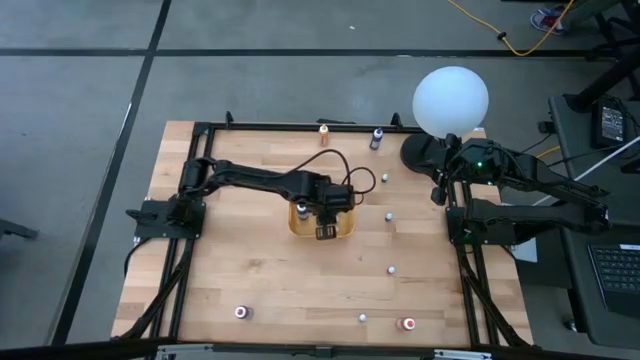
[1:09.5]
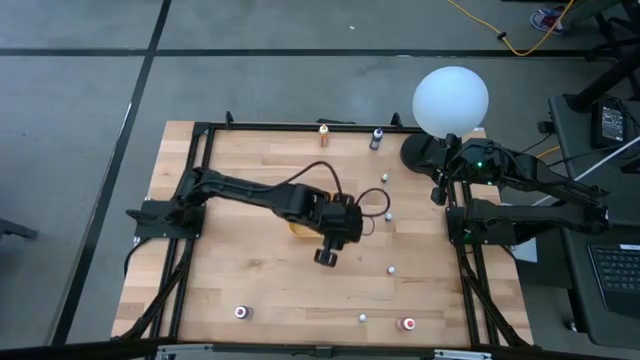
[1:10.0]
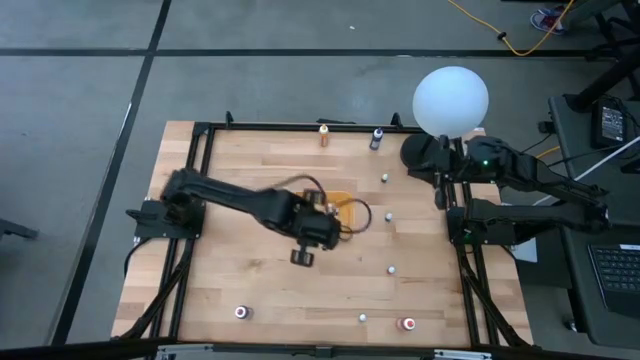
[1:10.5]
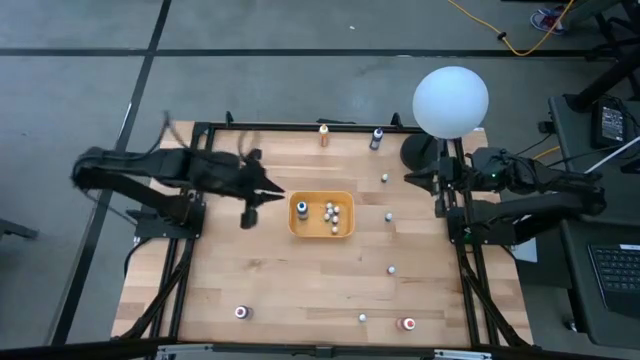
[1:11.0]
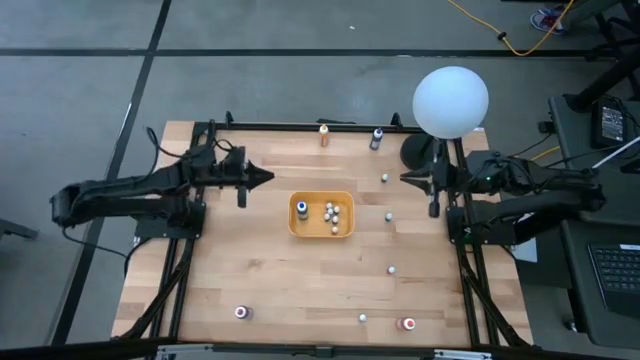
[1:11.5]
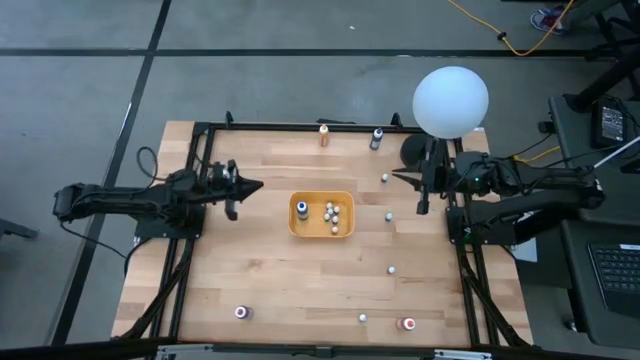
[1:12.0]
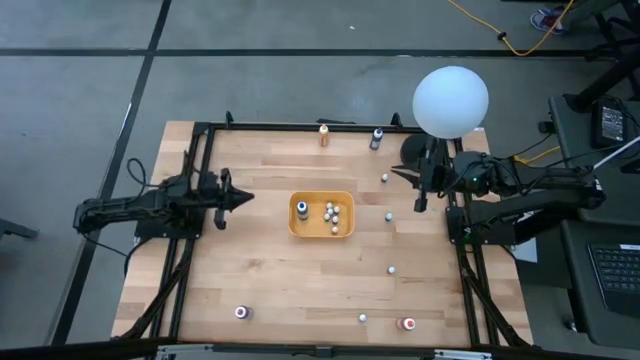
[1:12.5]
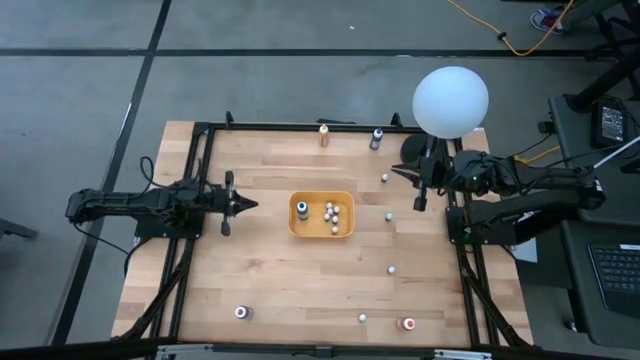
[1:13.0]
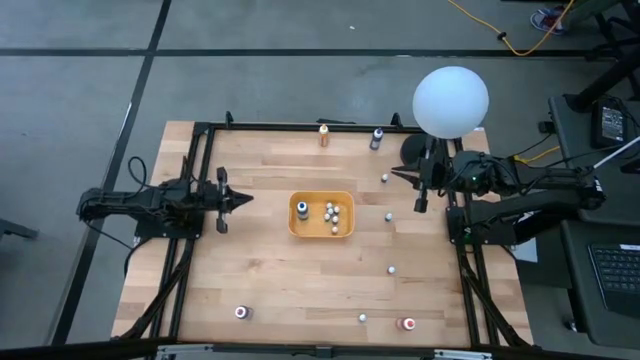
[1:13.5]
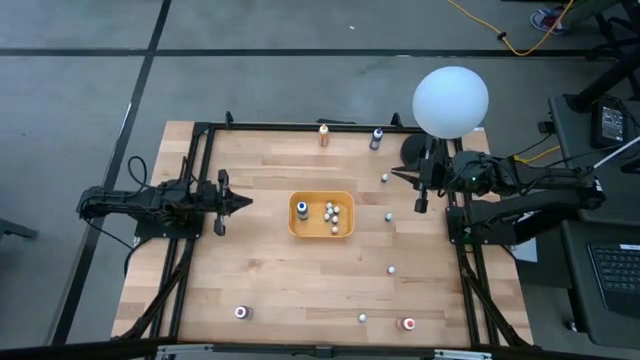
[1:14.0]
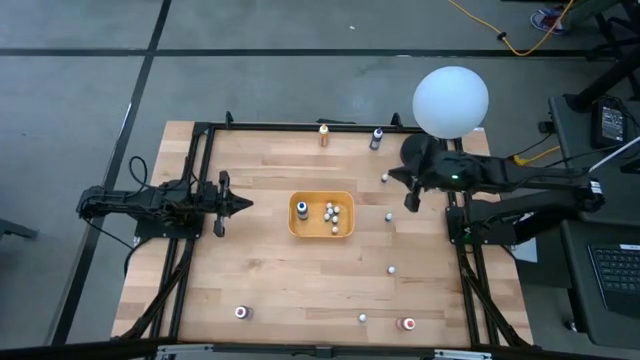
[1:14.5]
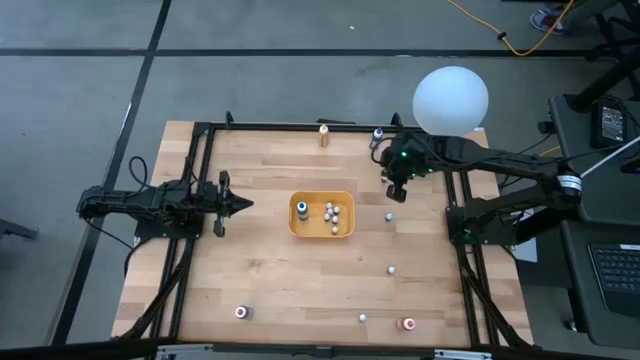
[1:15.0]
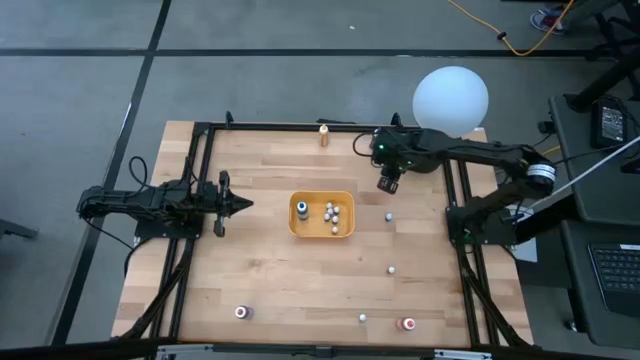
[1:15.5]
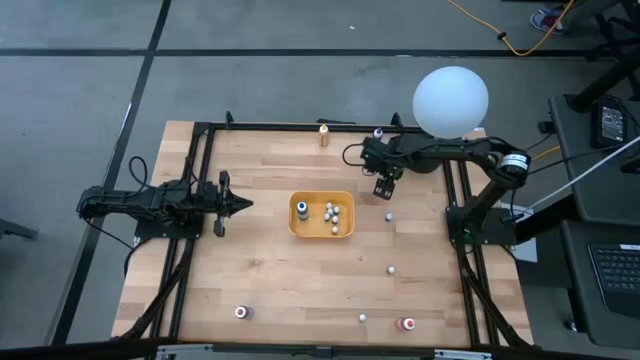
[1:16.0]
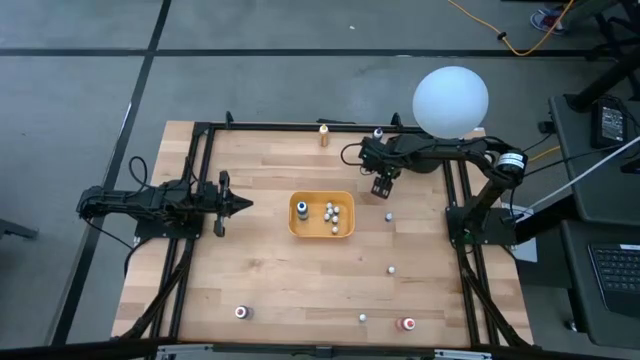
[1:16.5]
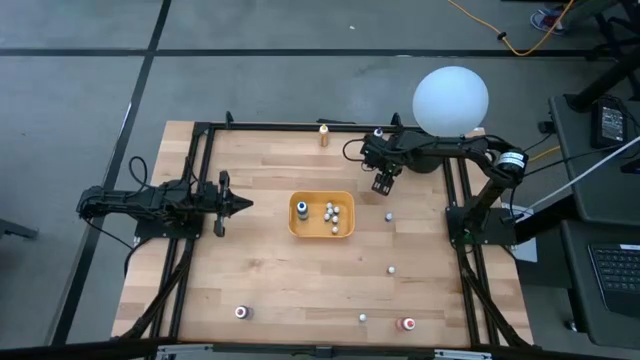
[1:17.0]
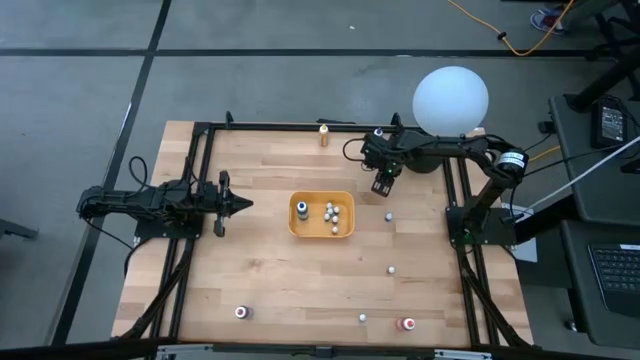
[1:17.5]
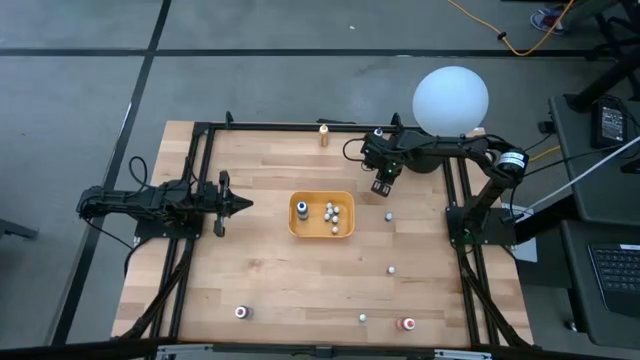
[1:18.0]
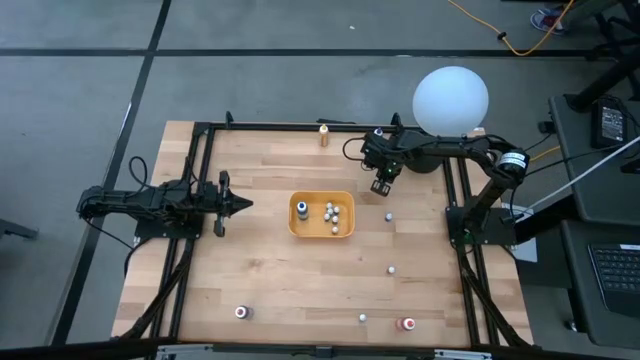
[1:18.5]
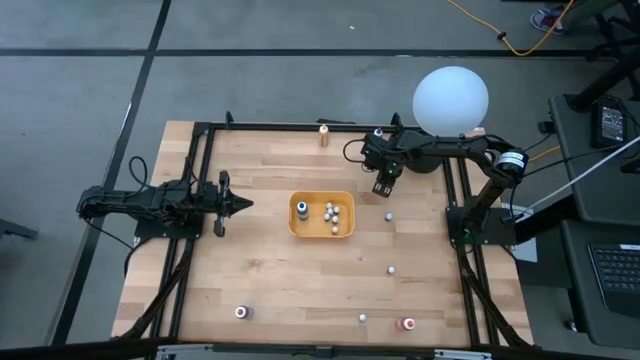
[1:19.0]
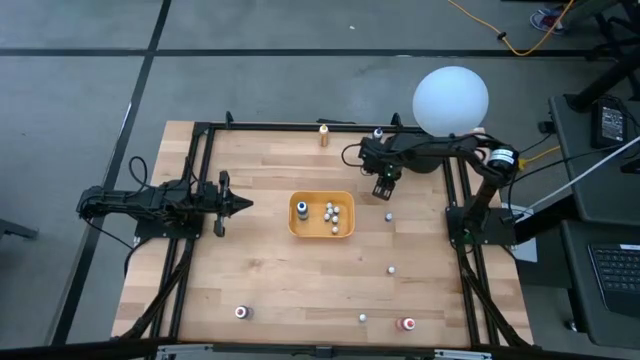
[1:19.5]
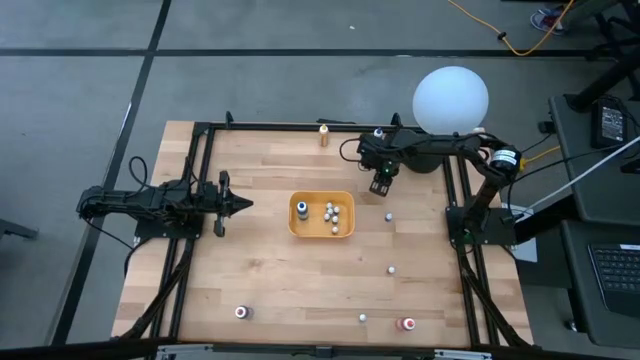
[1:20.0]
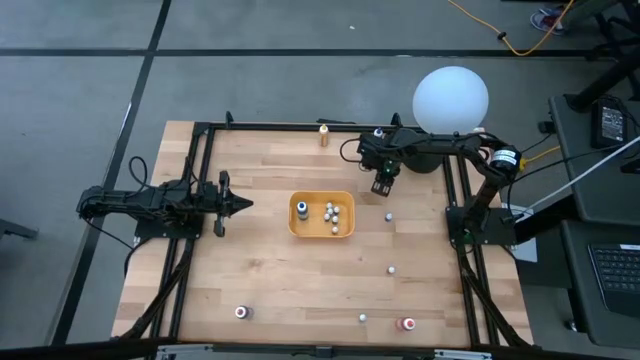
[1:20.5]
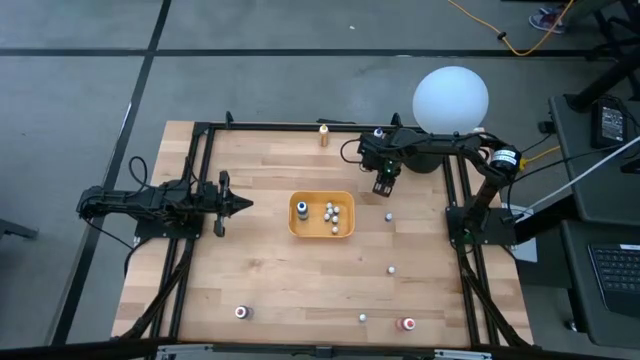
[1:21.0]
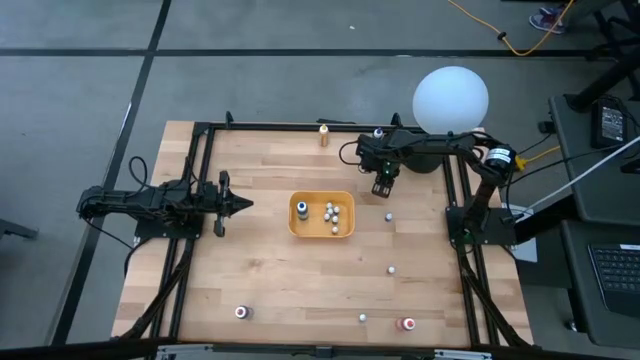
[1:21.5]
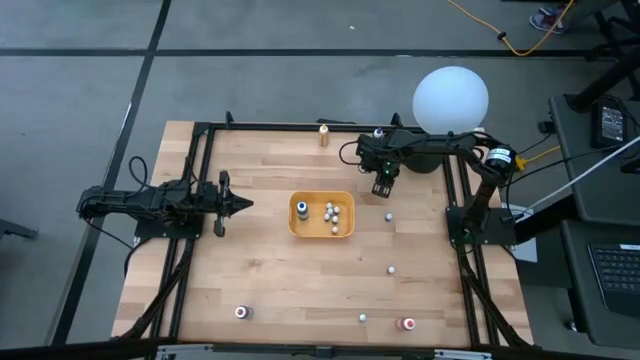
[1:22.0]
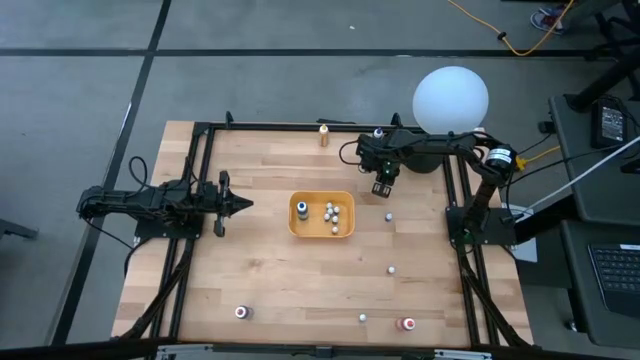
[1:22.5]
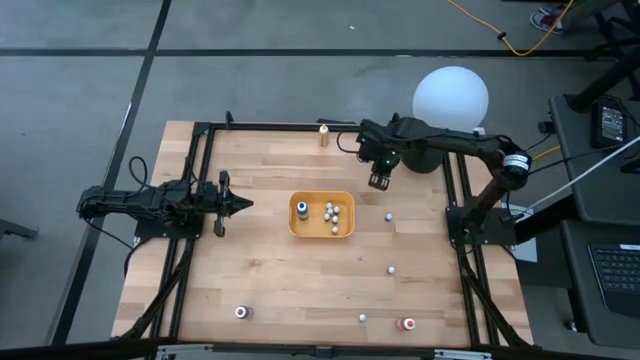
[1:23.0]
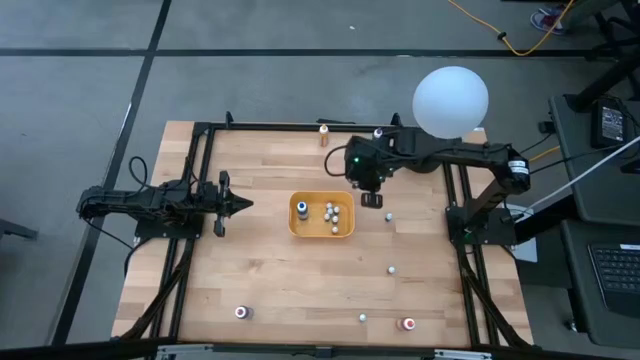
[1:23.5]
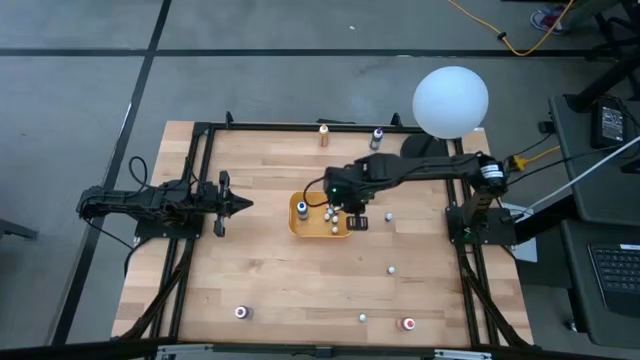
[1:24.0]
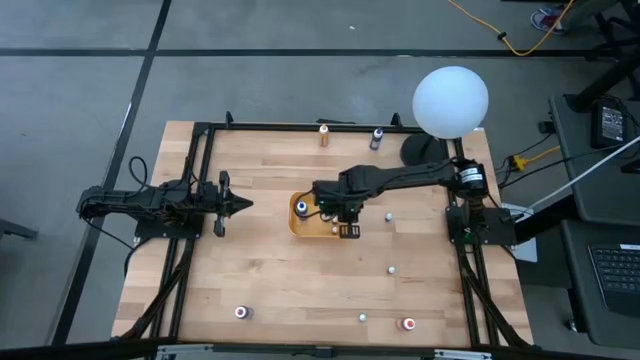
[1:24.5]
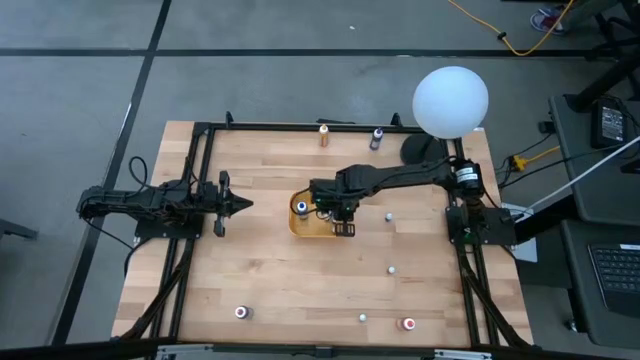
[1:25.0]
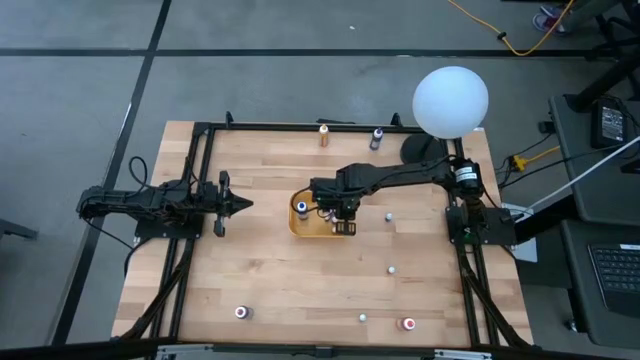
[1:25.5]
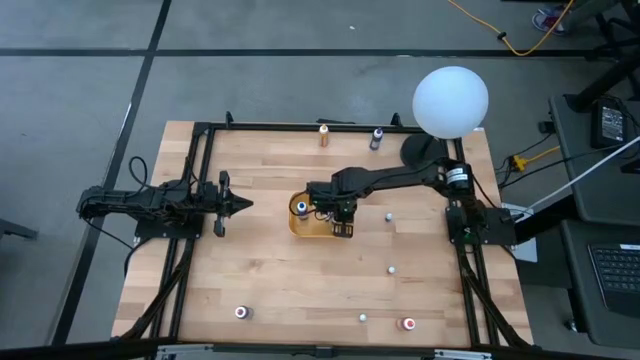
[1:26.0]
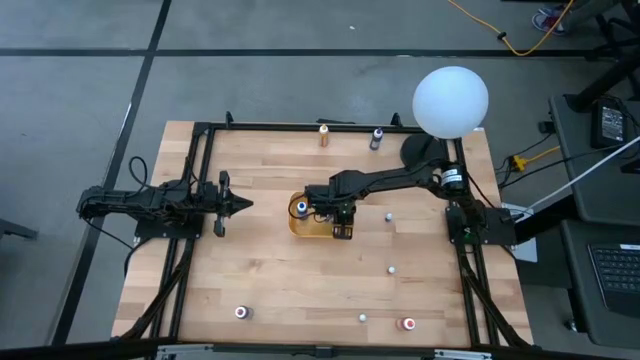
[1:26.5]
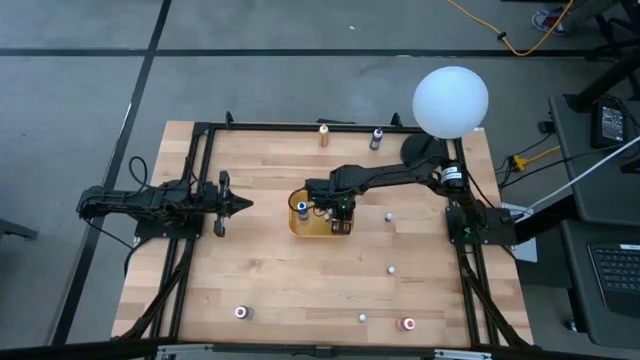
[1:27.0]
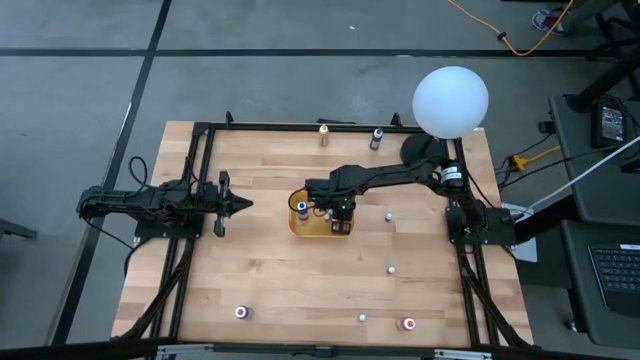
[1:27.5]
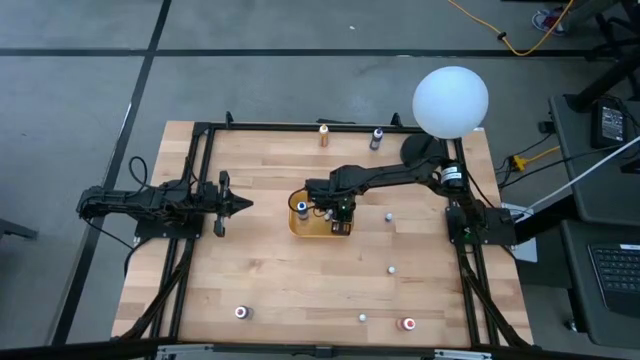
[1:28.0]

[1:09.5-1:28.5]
Task: Pick & Place food coloring
Put the black food coloring bottle into the yellow bin

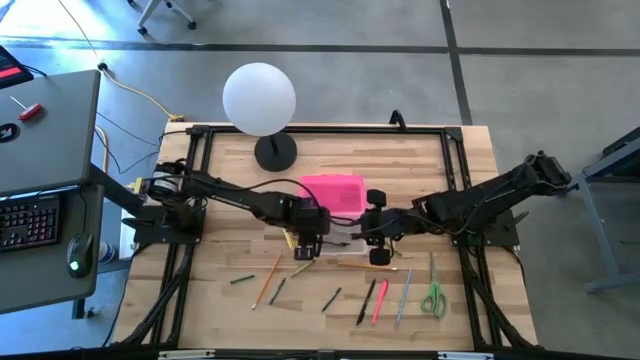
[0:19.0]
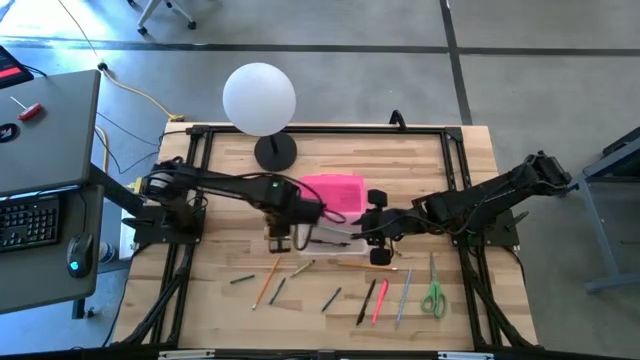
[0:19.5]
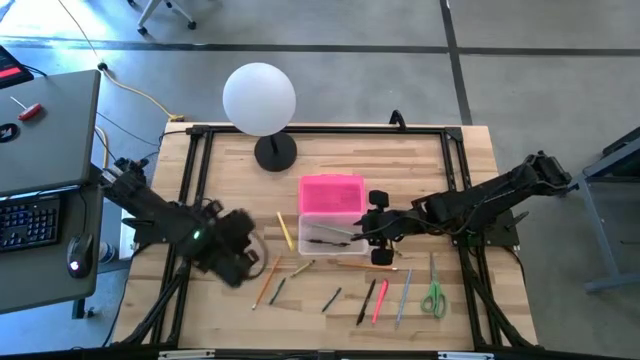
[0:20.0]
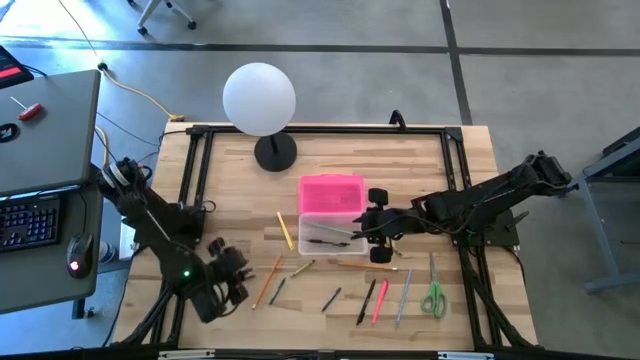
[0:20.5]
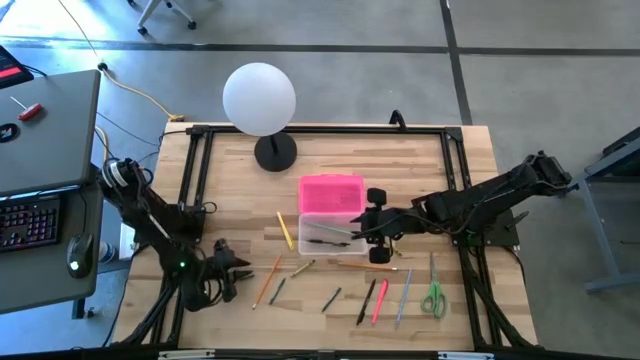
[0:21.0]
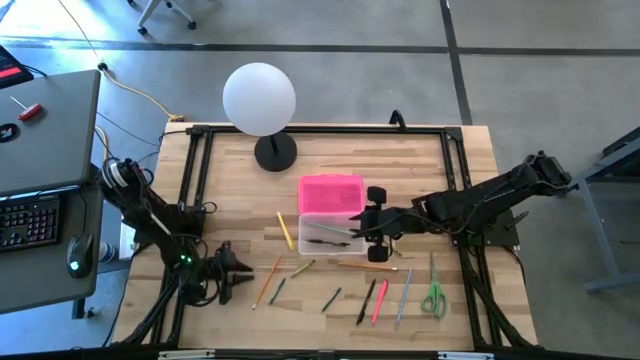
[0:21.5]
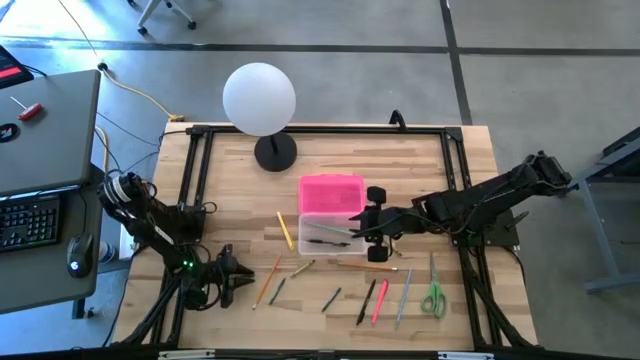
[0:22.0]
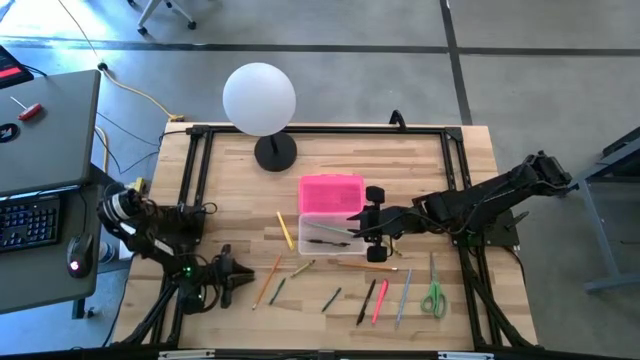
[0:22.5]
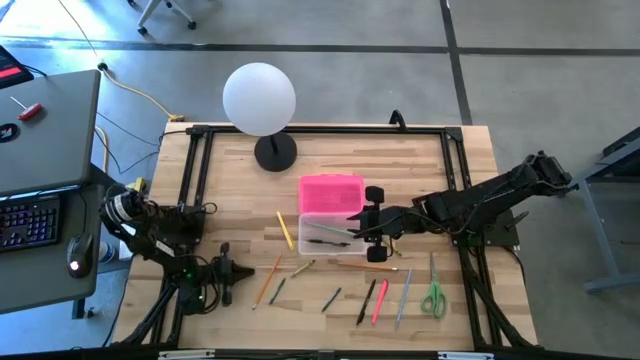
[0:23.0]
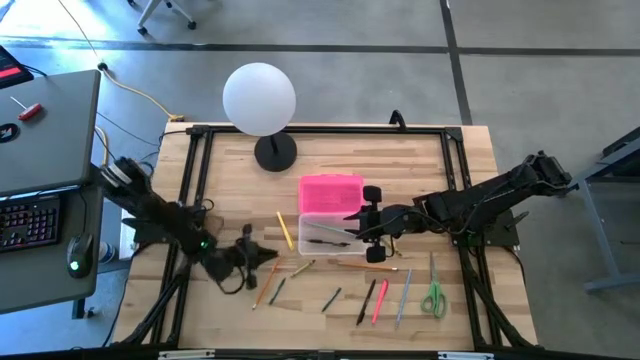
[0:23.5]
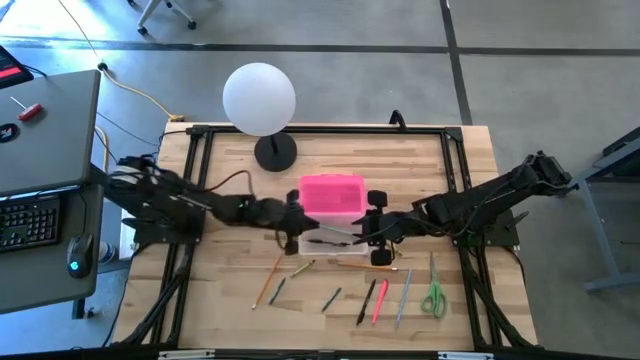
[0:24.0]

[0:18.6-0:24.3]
Task: Pick & place school supplies into a supply box
Put the green crayon into the pink supply box
